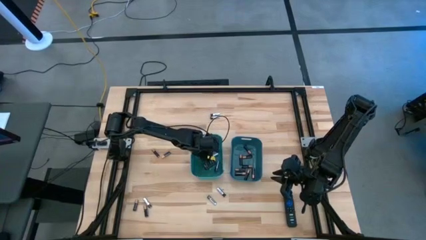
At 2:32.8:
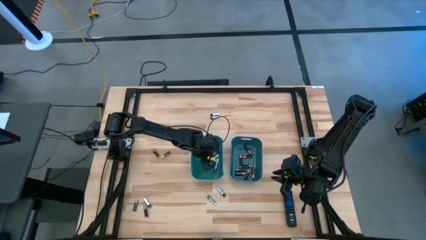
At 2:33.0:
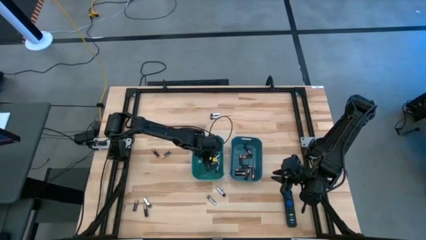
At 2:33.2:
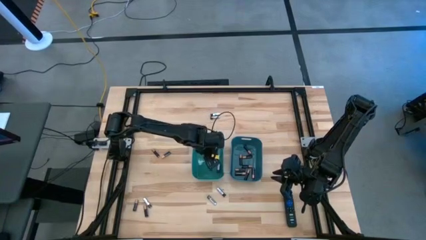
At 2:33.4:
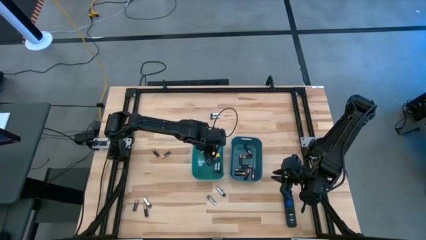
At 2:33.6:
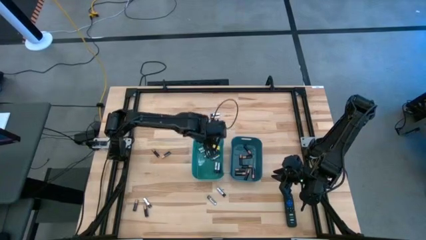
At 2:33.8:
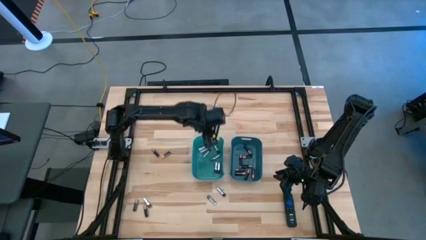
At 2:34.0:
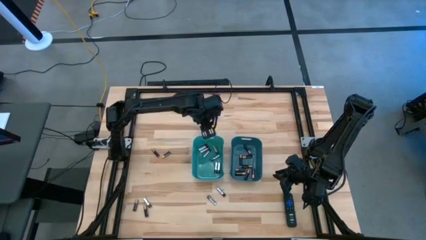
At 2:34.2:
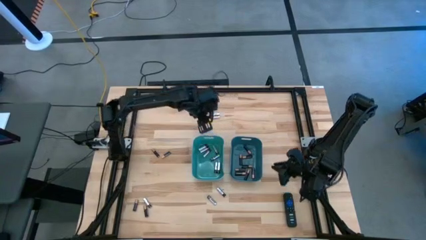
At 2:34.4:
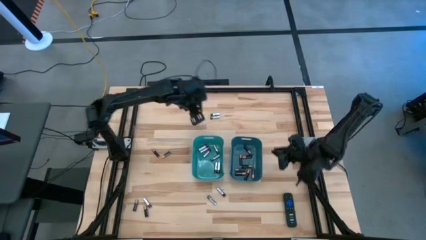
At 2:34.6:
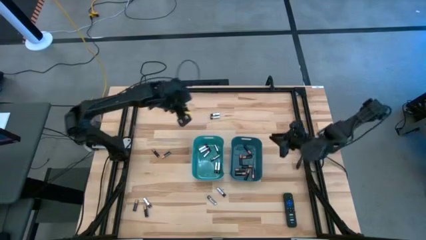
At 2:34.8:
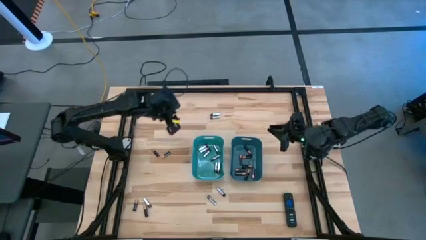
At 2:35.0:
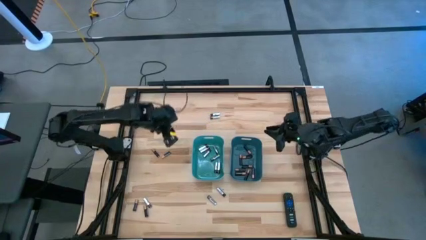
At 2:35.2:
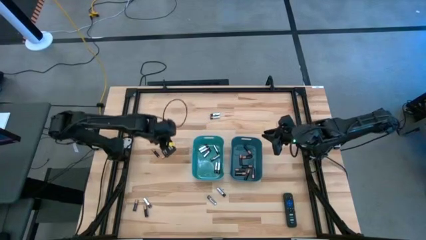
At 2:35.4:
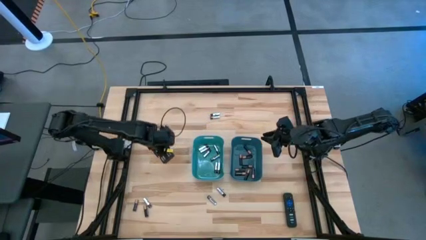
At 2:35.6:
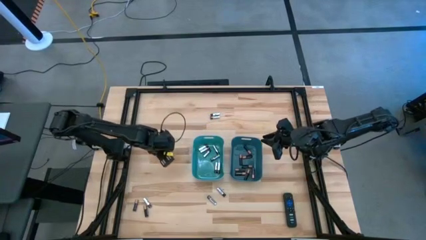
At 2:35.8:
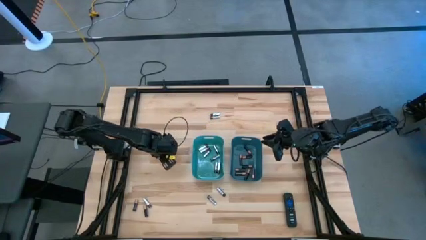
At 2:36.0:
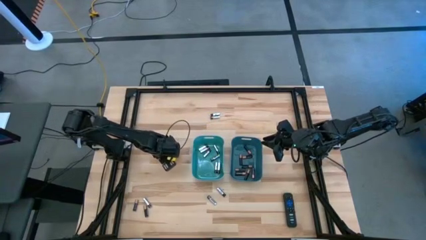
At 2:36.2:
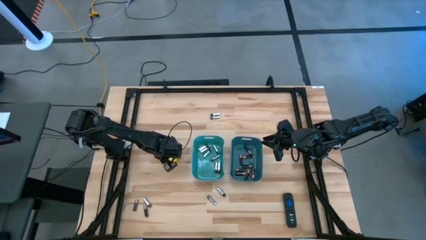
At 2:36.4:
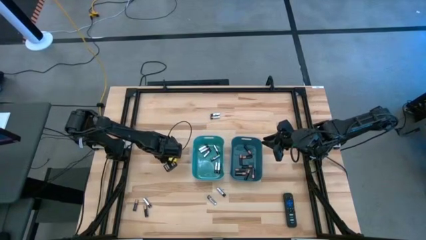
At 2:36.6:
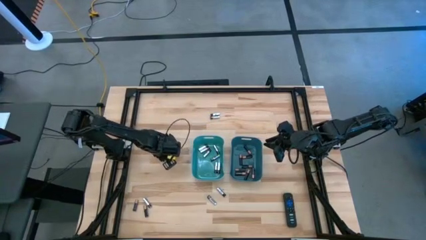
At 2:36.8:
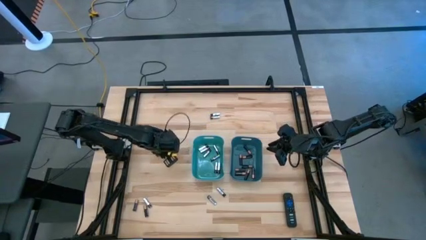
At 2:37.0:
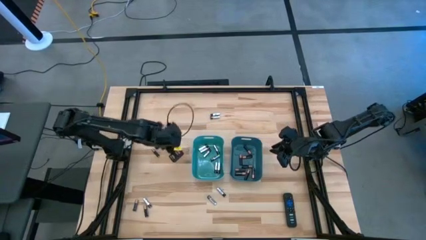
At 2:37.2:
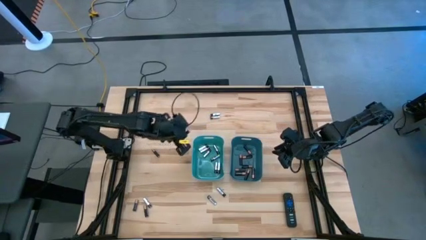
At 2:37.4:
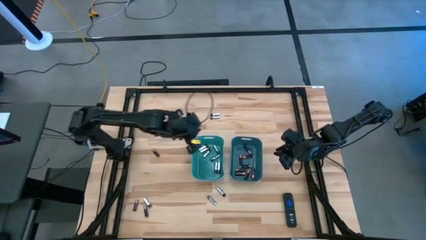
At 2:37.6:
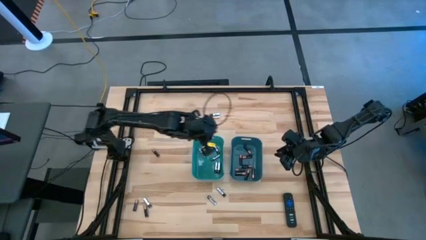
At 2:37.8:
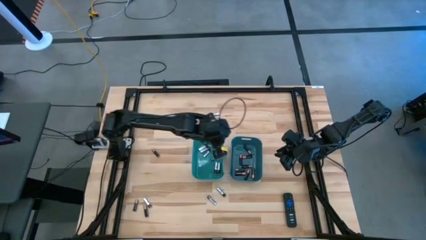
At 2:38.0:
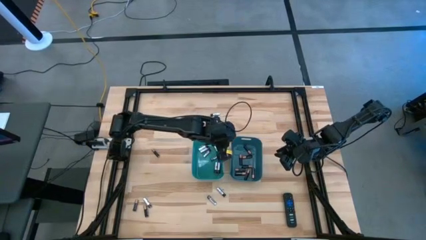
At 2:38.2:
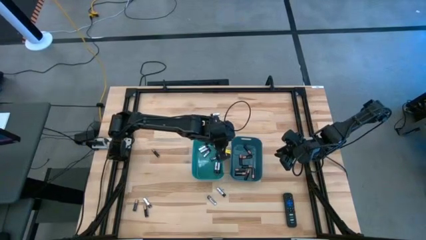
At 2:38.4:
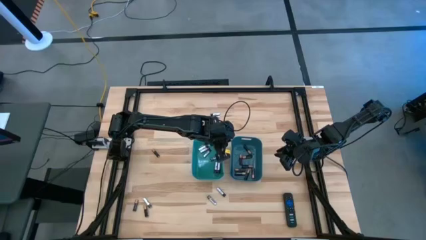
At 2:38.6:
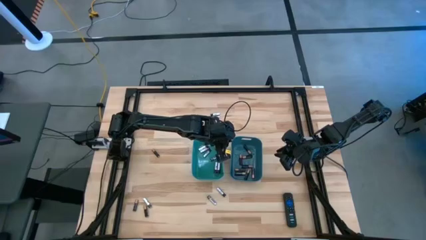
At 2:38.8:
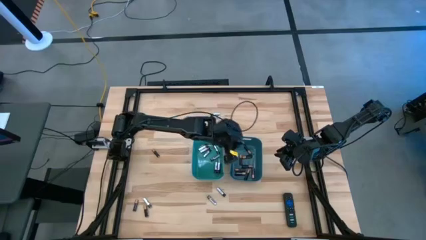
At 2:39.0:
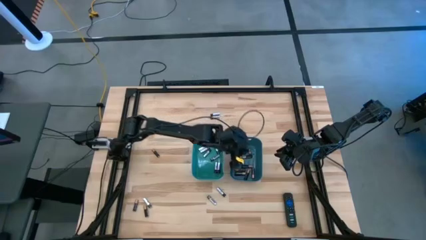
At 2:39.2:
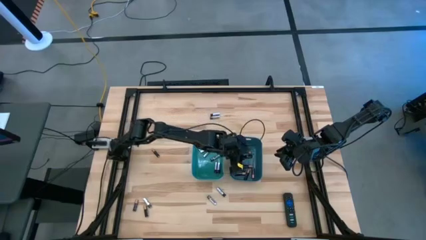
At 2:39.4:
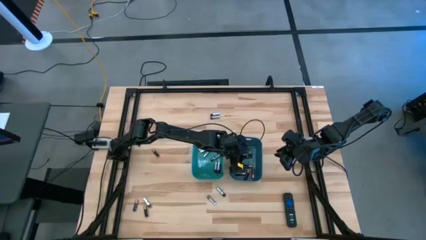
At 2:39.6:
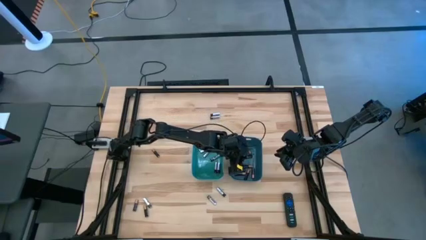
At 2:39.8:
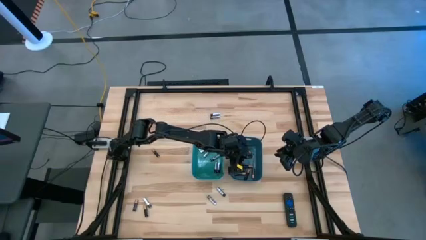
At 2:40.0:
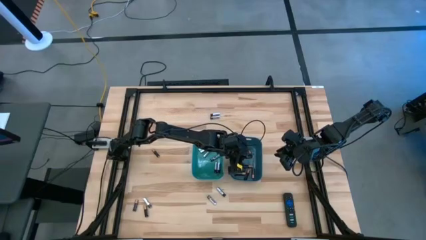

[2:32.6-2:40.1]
Task: Sort batteries
Put the black battery into the blue bin

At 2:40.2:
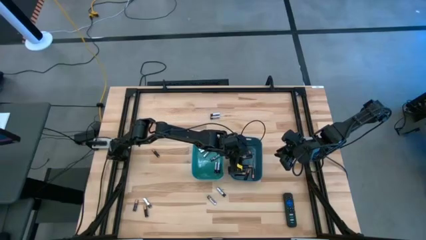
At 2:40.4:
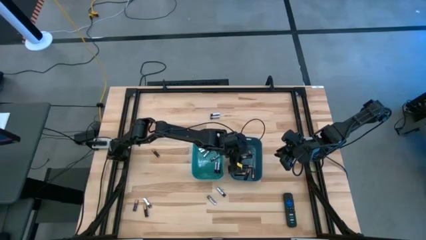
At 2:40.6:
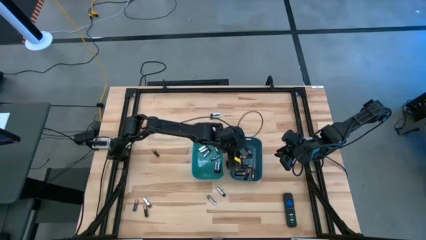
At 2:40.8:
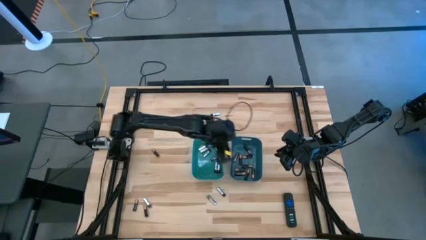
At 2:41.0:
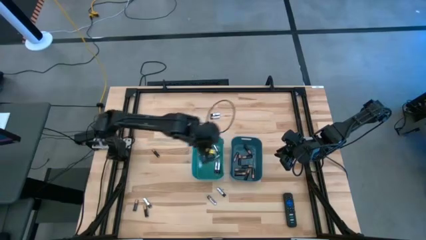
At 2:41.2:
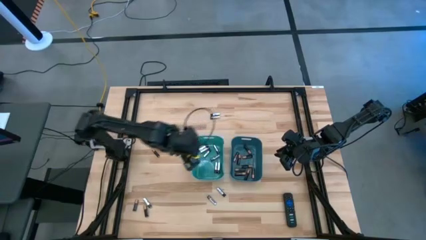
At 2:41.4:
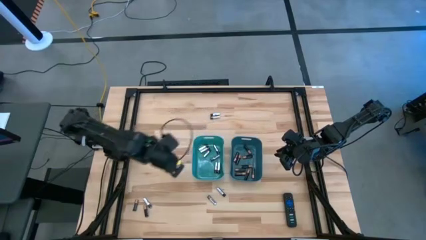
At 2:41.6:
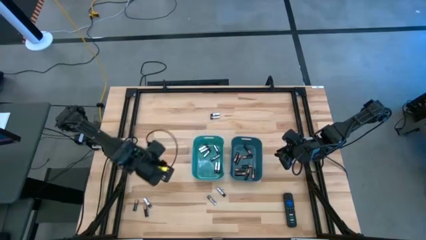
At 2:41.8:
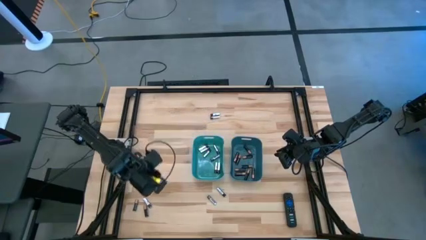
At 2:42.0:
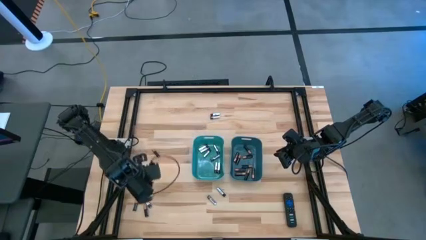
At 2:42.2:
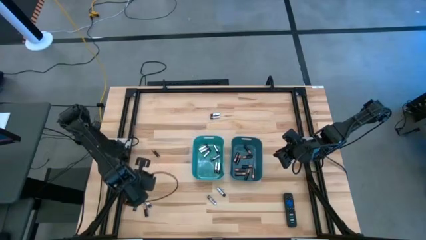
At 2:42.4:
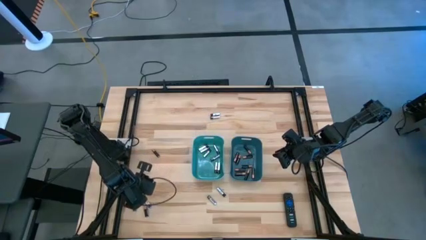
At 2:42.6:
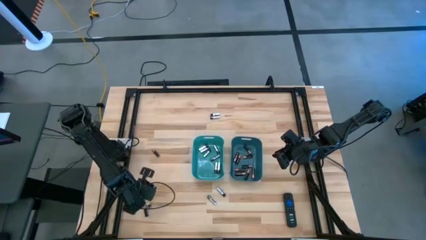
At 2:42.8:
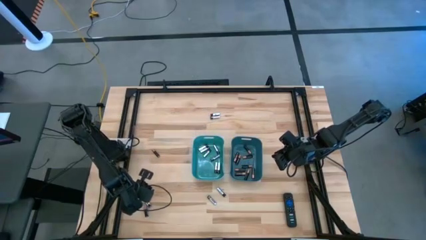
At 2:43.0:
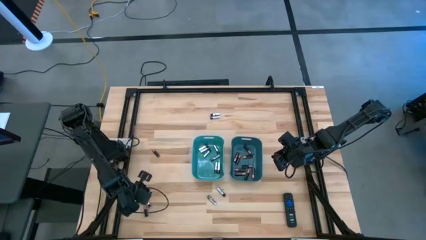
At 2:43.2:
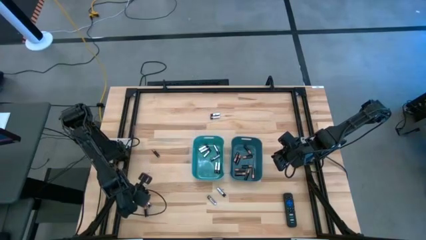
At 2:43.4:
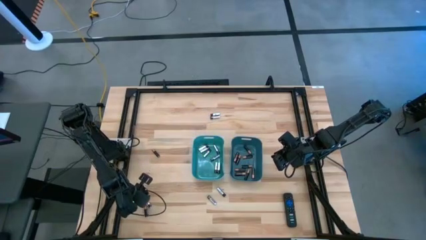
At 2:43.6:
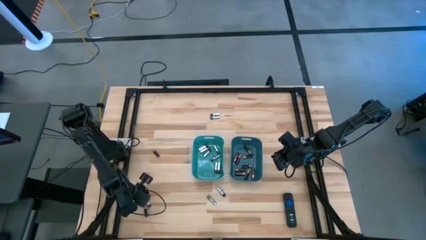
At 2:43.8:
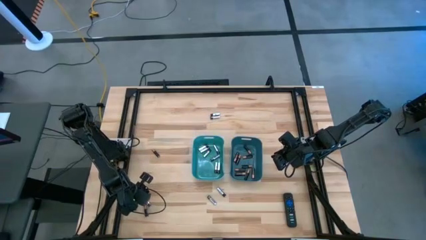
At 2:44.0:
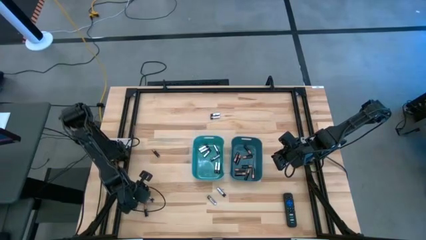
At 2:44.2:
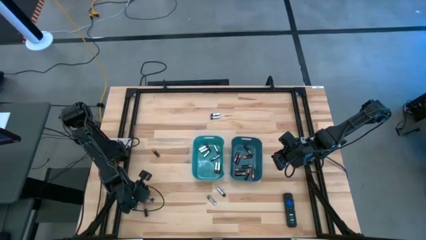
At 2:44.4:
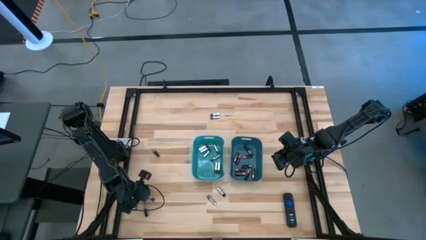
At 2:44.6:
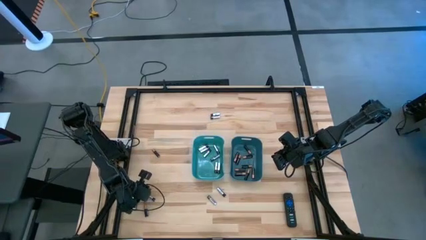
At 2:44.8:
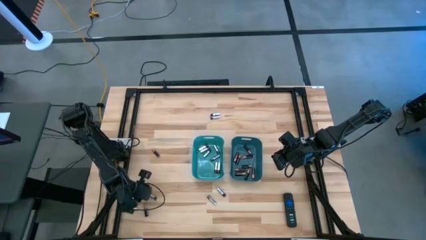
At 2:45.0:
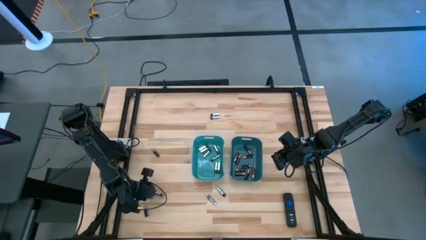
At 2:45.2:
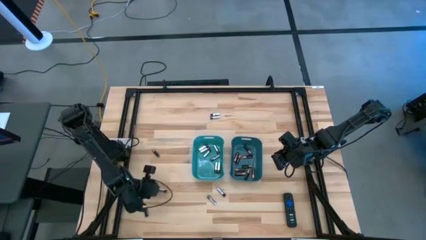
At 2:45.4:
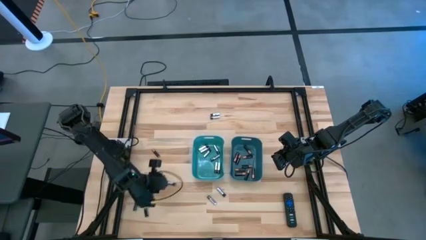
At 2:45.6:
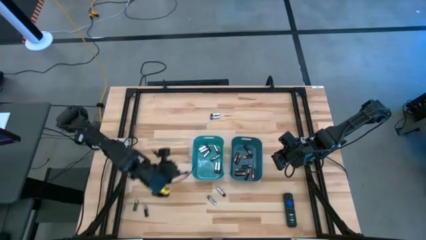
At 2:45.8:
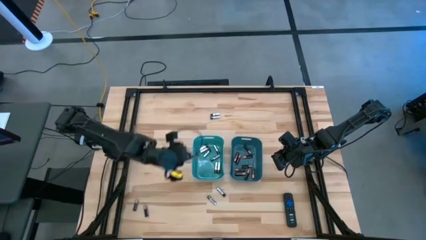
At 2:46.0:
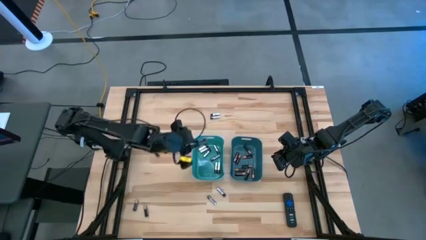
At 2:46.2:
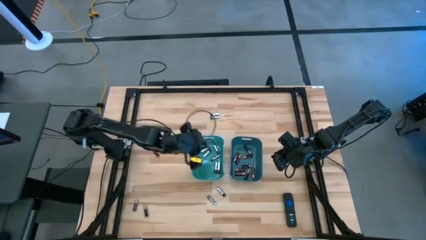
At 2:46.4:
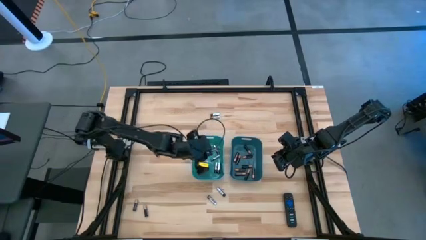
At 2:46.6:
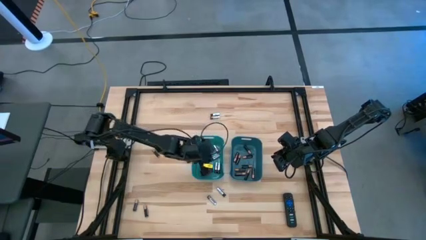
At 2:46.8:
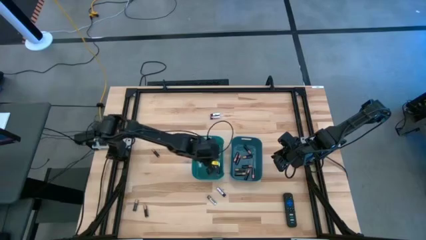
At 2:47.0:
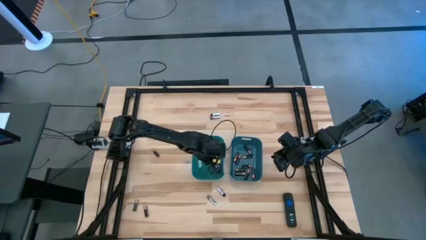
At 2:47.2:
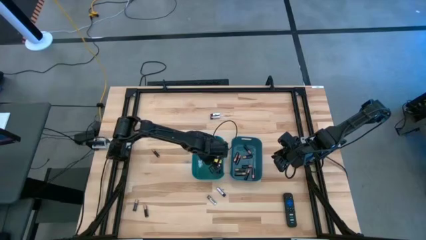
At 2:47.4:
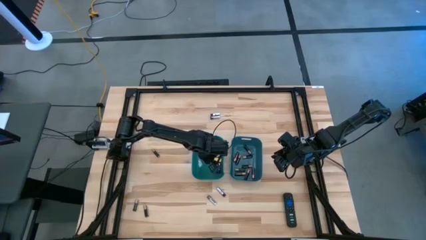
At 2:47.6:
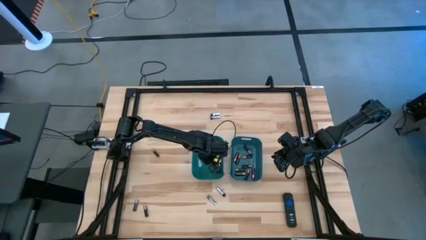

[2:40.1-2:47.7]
Put the silver battery into the green bin
